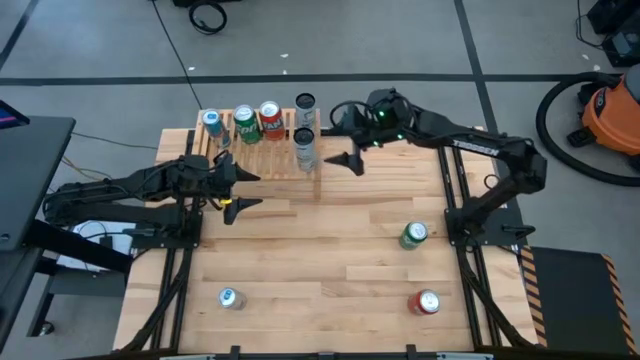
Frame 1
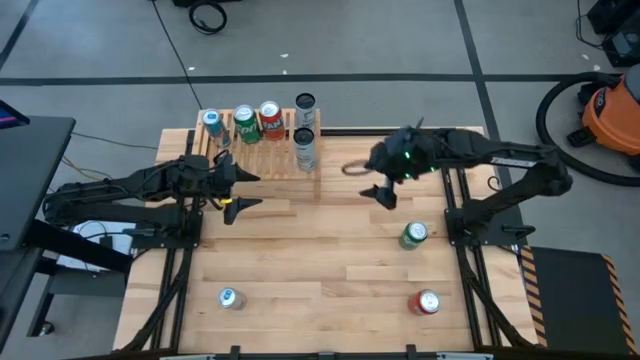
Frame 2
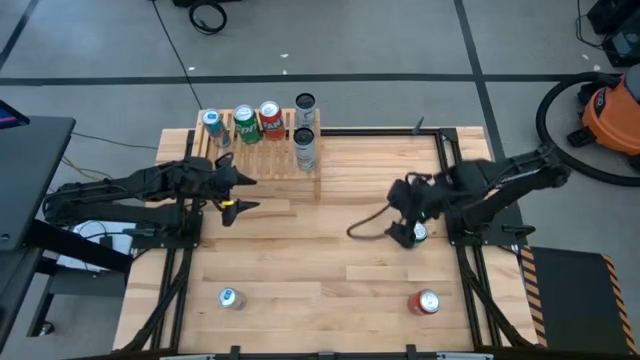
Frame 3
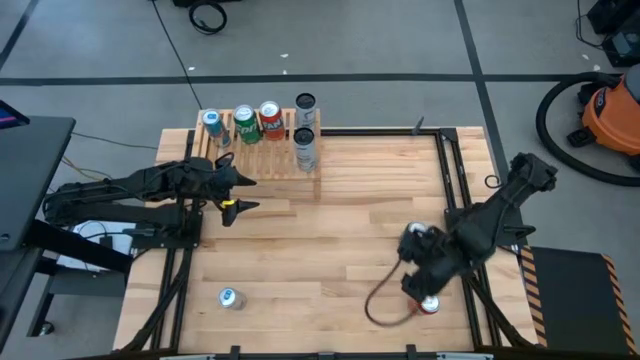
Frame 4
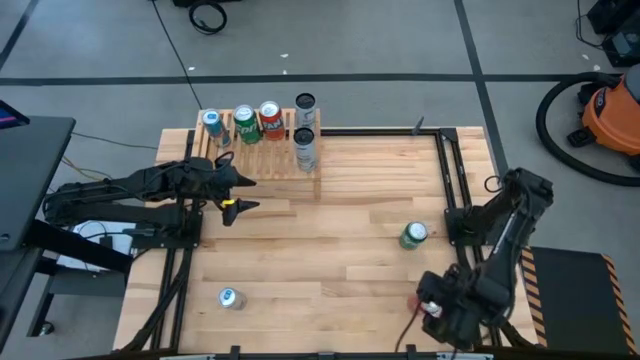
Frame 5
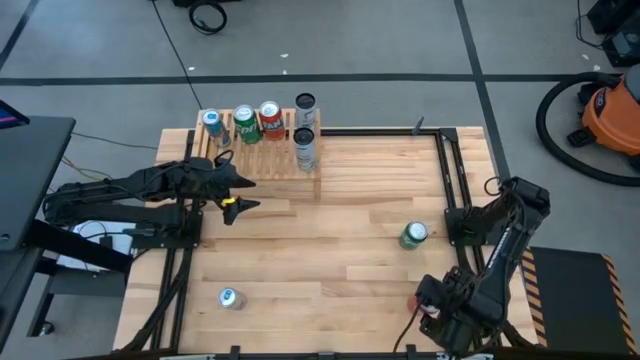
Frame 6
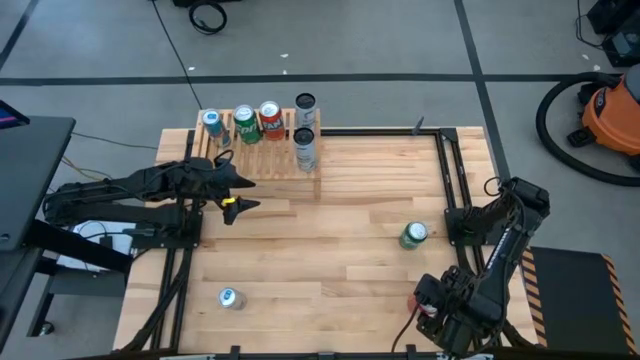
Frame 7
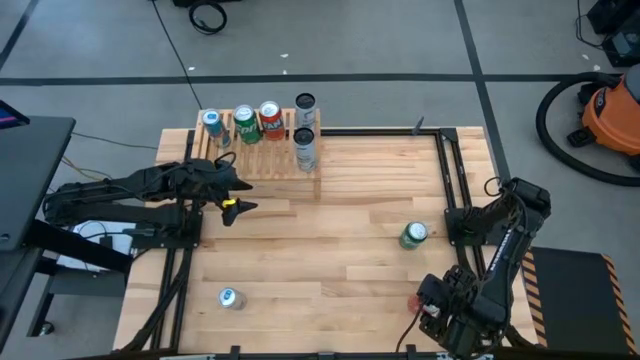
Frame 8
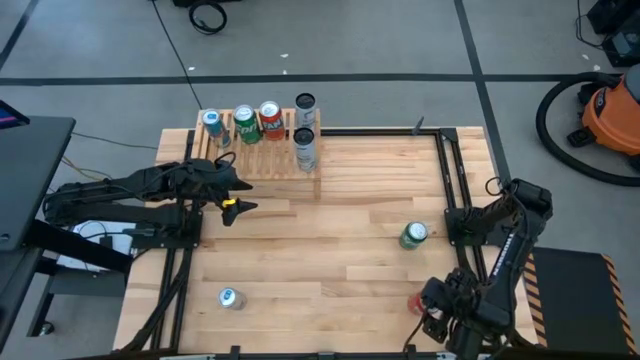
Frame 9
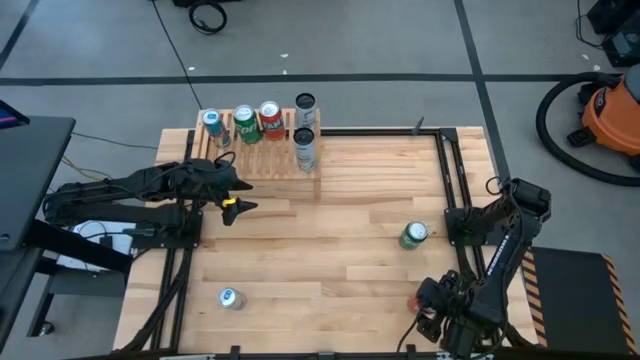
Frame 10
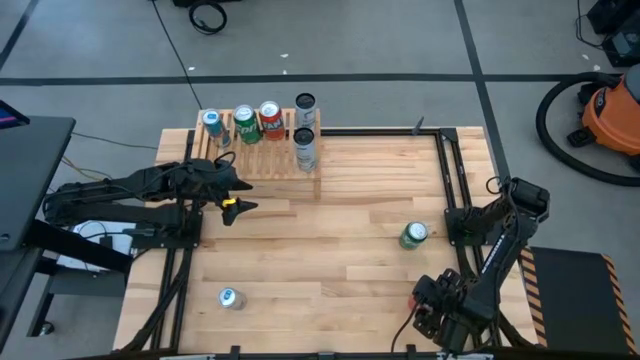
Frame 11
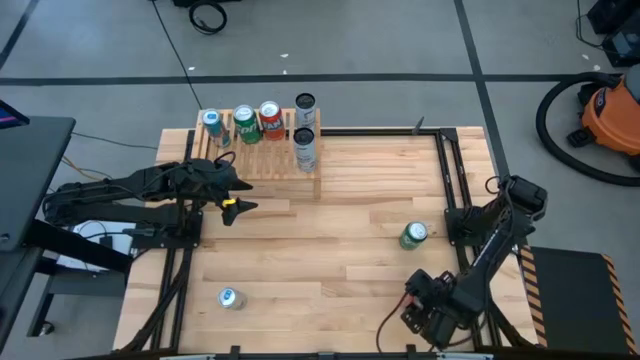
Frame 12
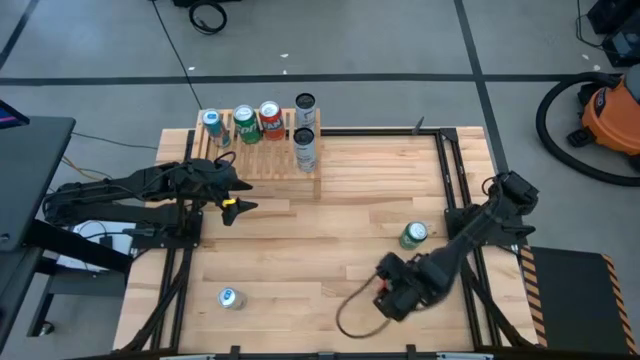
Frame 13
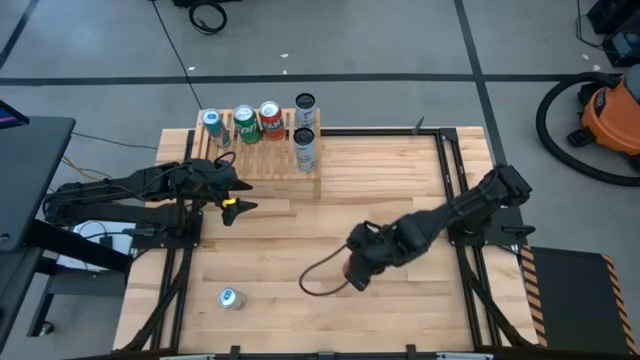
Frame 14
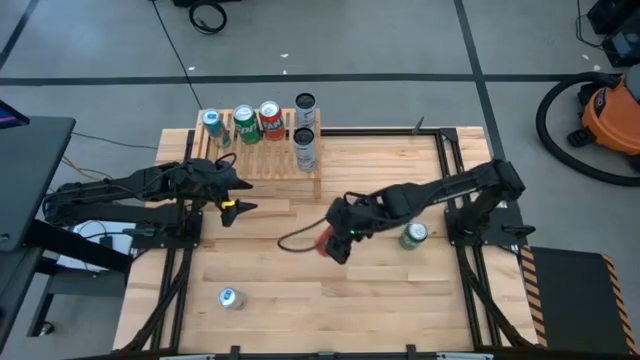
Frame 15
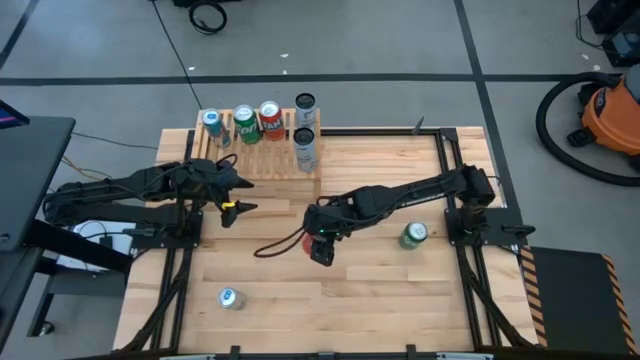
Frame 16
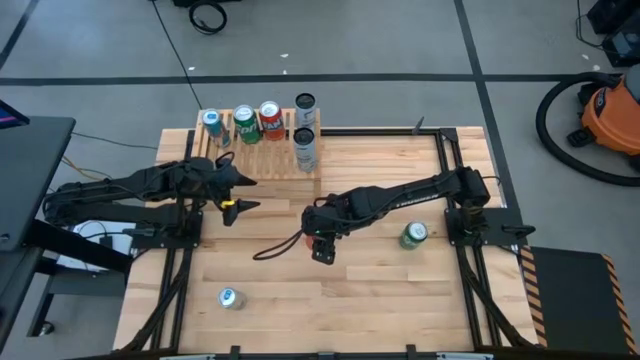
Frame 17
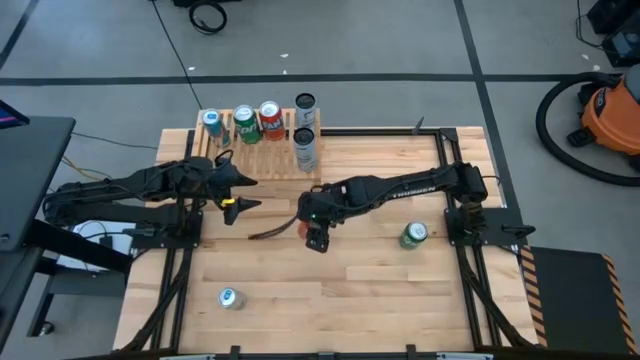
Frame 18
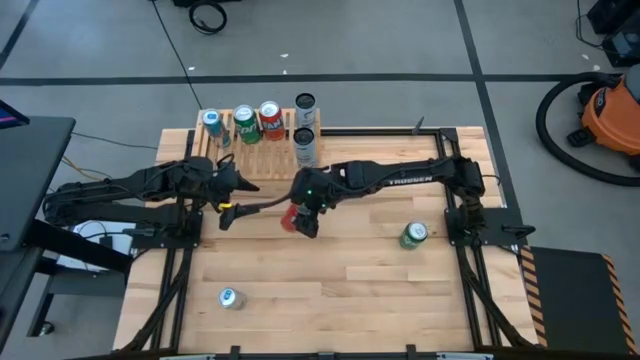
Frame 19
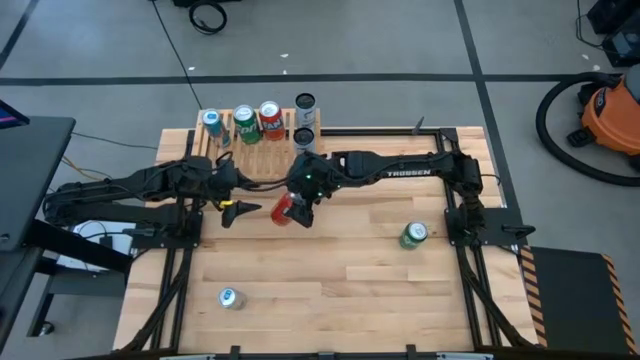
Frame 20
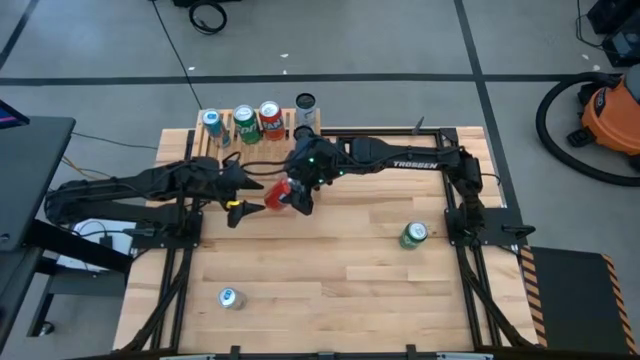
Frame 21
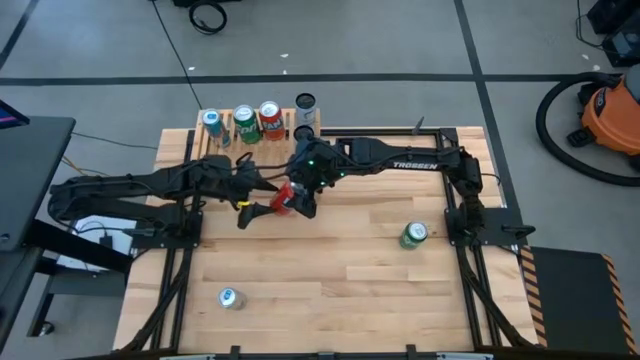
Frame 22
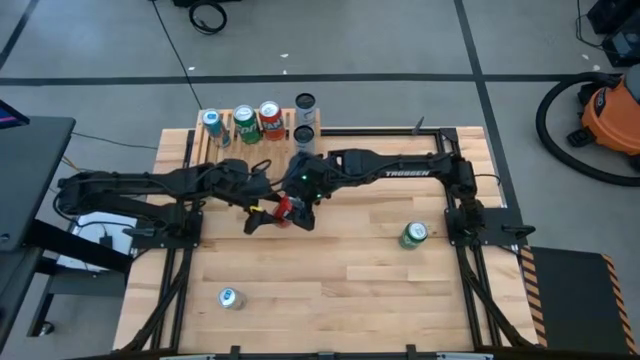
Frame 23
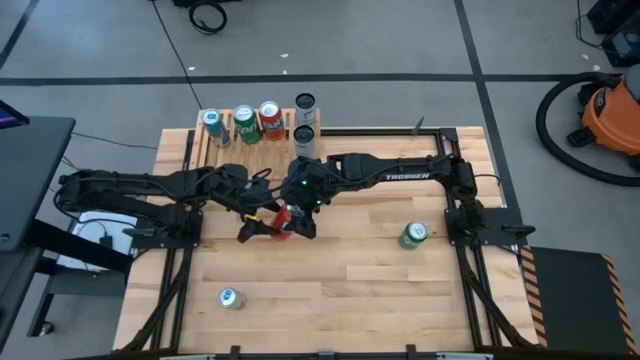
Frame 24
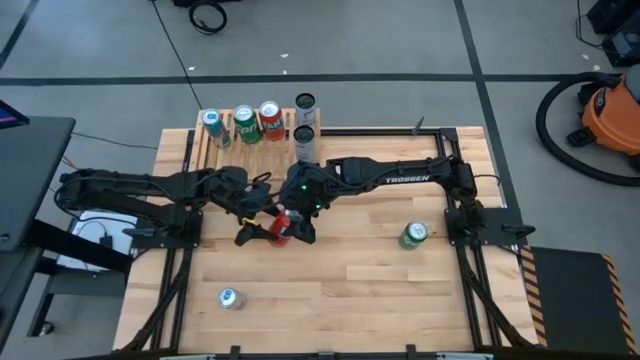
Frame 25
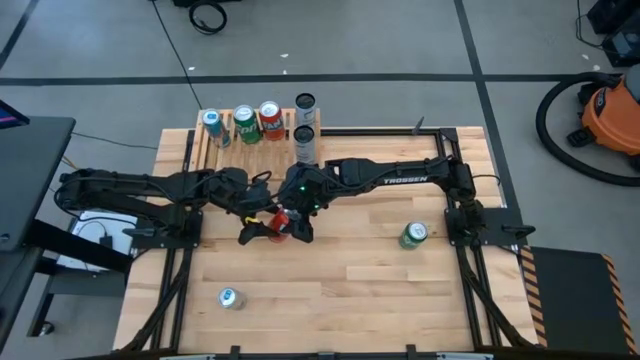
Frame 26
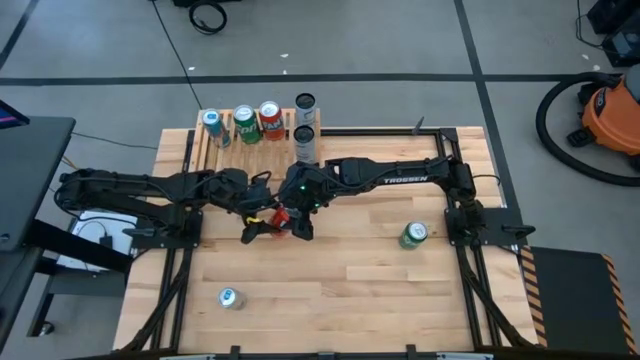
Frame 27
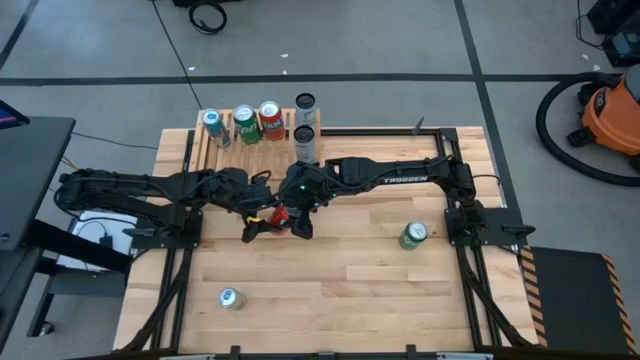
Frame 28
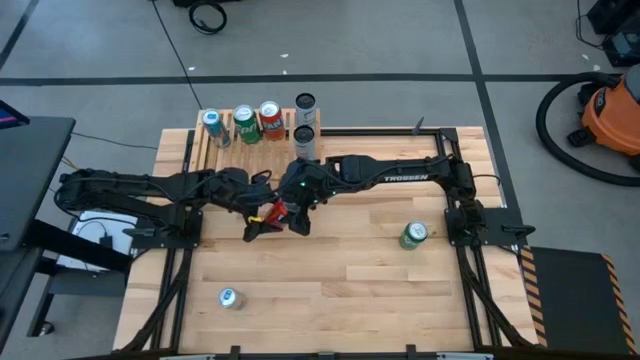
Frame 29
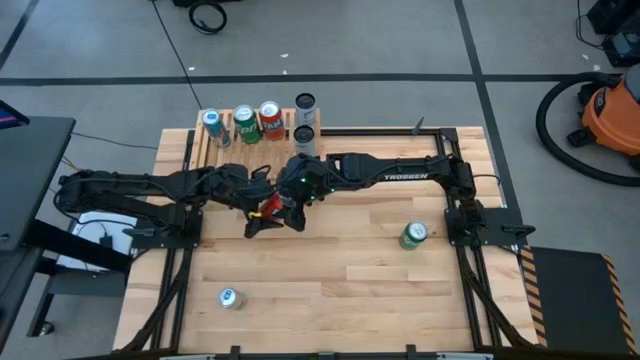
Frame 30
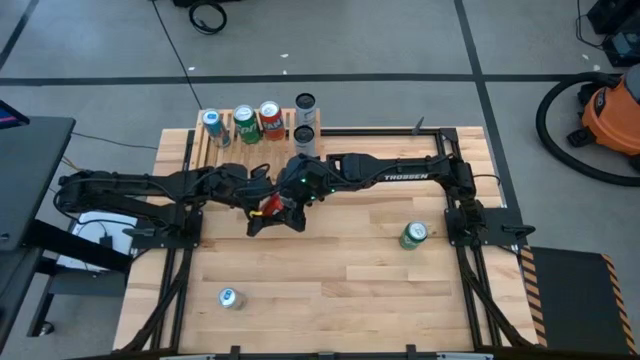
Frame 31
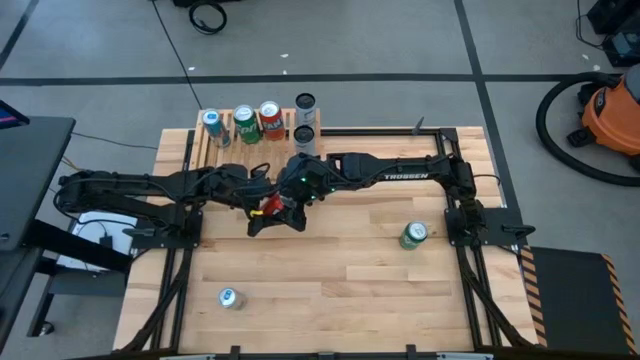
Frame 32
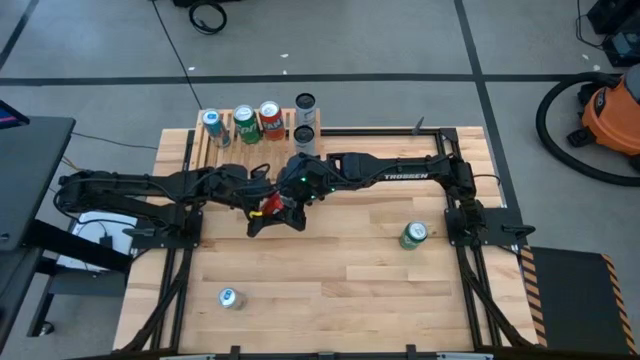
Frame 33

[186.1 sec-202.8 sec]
Task: Place canned beverage on shelf
Put the orange soda can on the shelf

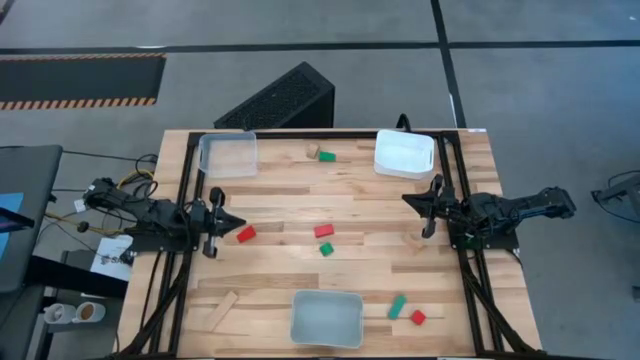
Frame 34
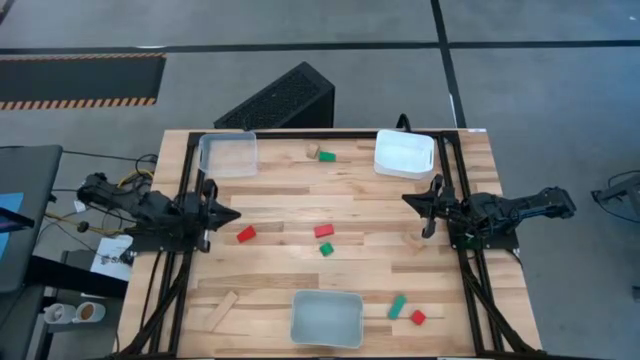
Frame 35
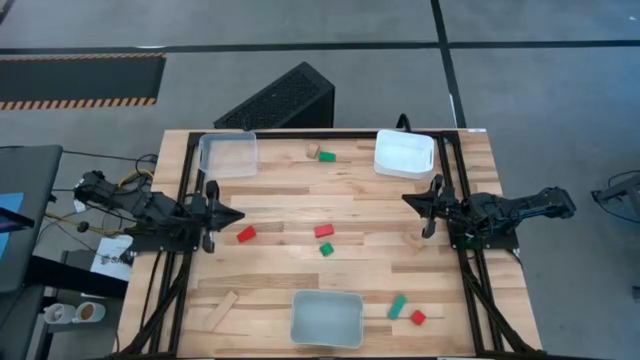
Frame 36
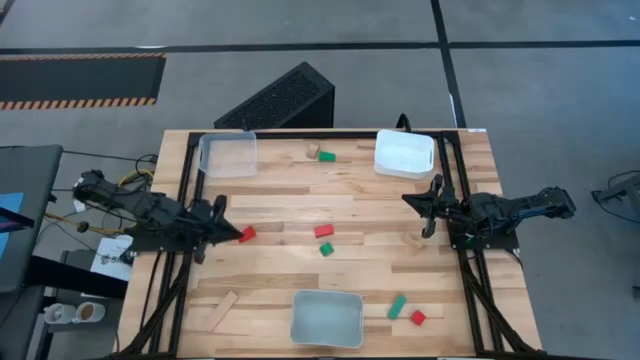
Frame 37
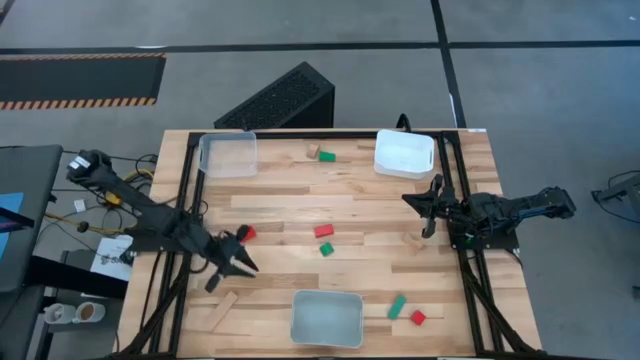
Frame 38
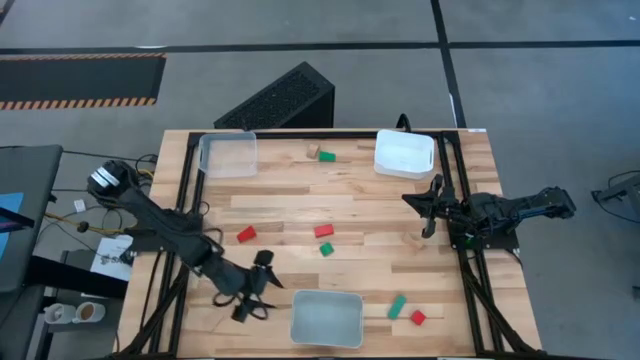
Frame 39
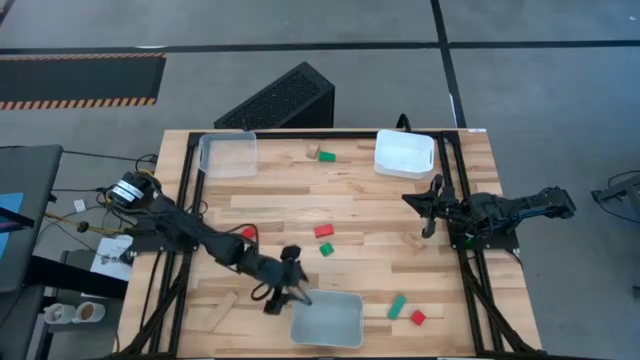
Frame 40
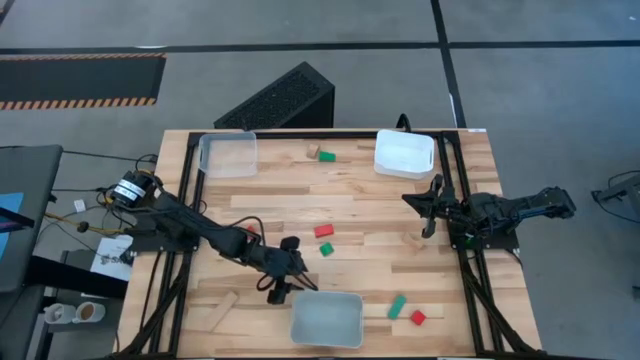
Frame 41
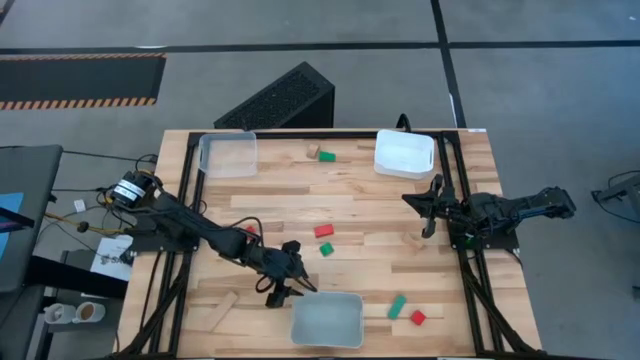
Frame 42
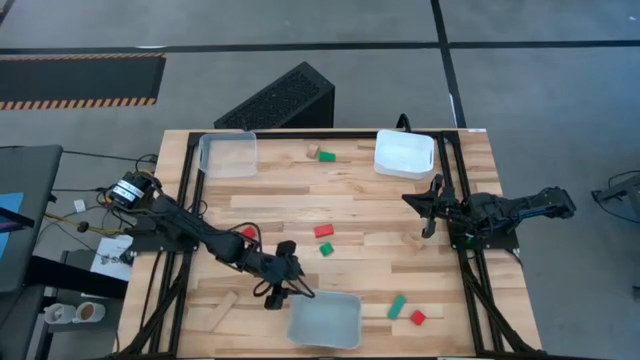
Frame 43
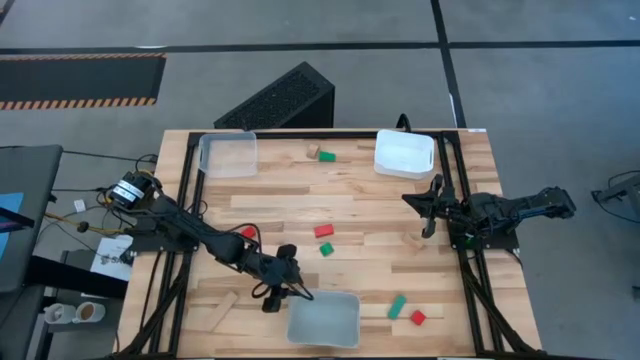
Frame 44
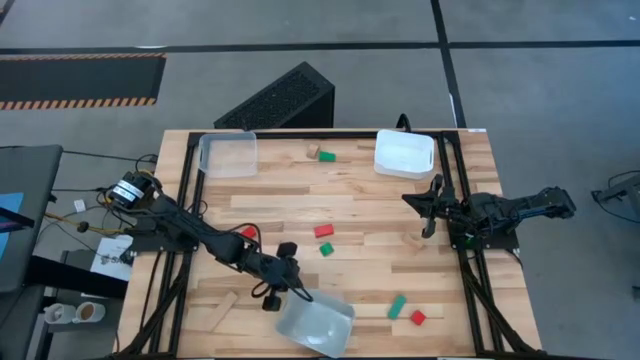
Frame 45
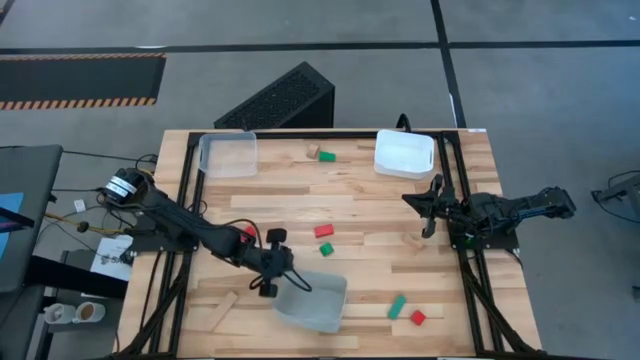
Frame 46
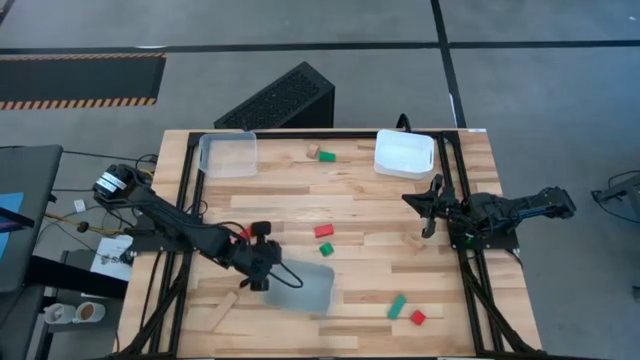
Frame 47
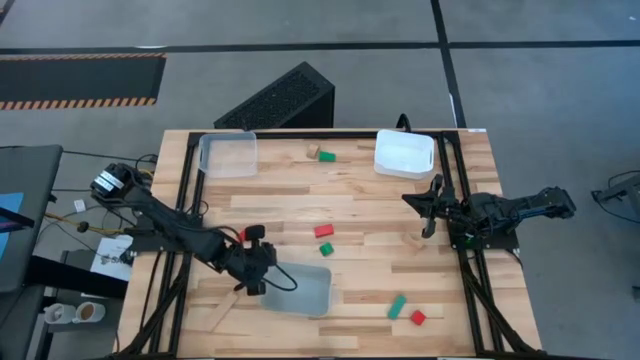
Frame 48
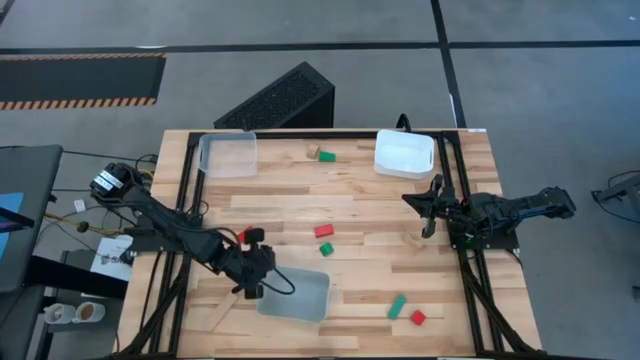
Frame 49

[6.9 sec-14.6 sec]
Task: Sort & place blocks by color
Adjust the gray bin on the table
